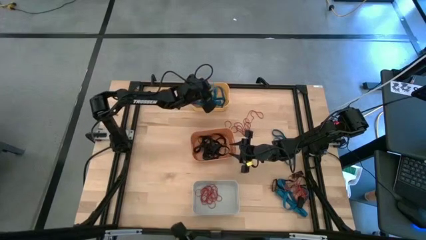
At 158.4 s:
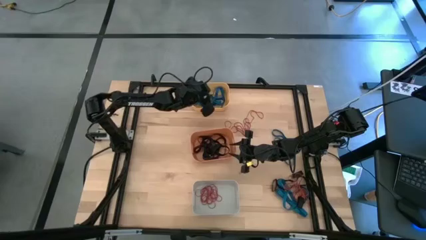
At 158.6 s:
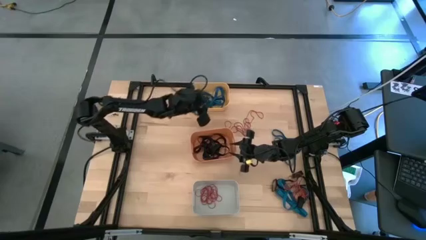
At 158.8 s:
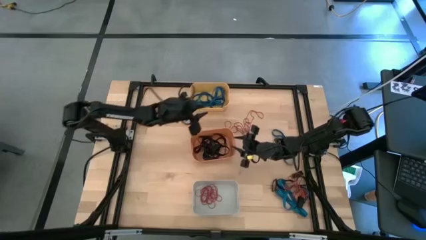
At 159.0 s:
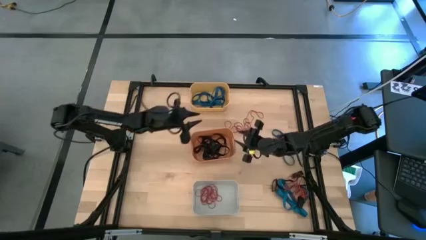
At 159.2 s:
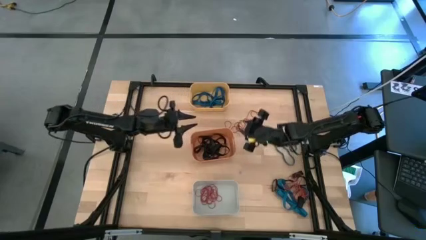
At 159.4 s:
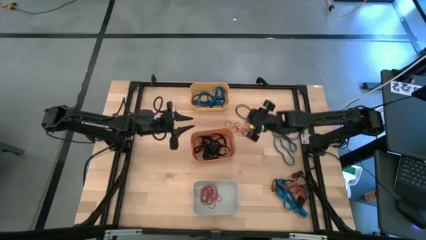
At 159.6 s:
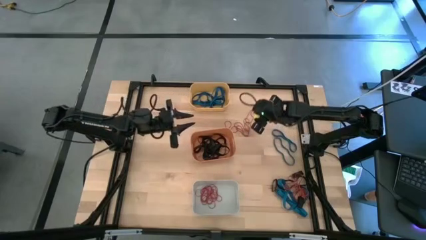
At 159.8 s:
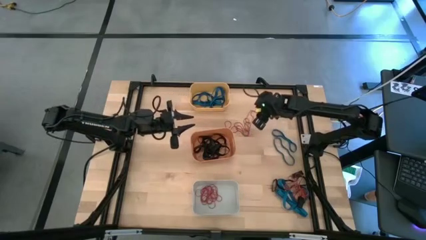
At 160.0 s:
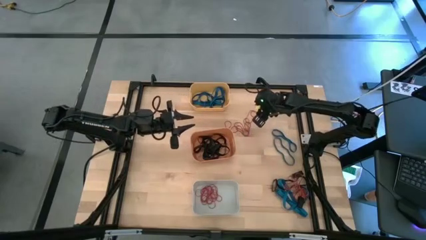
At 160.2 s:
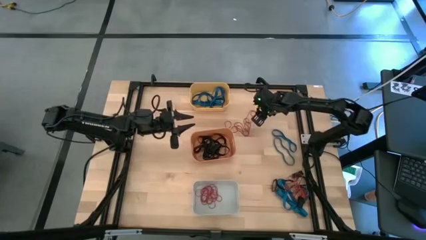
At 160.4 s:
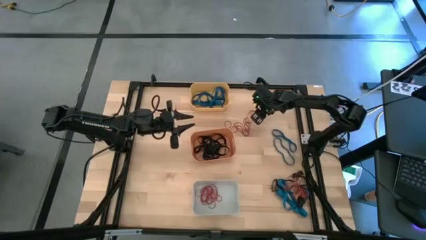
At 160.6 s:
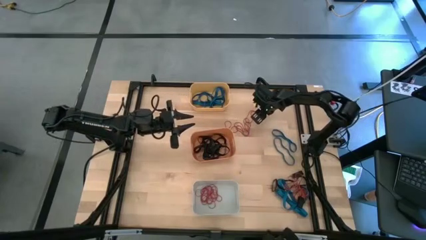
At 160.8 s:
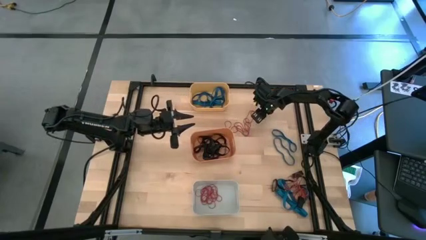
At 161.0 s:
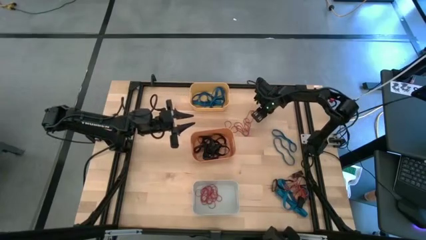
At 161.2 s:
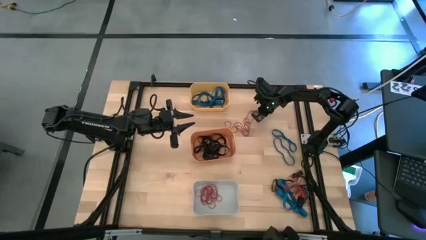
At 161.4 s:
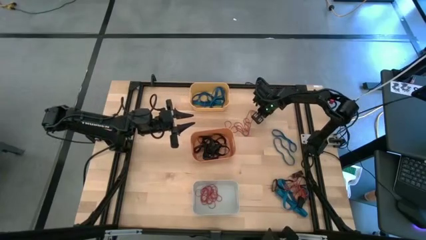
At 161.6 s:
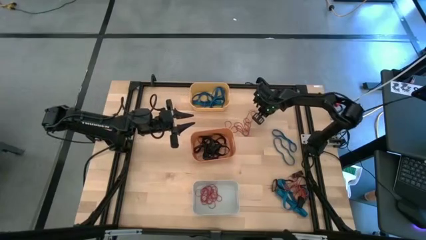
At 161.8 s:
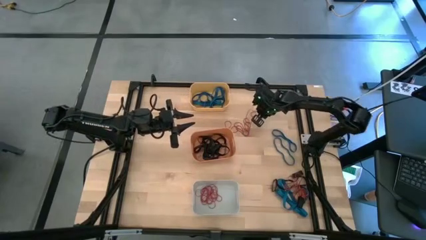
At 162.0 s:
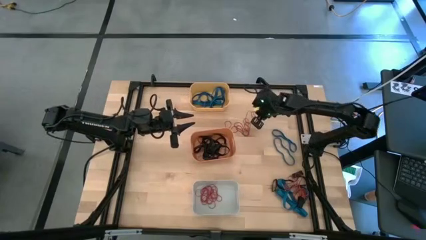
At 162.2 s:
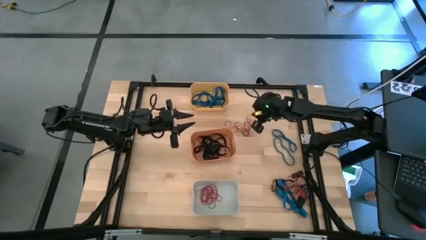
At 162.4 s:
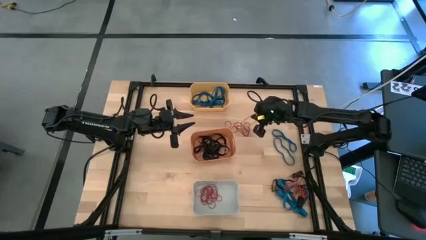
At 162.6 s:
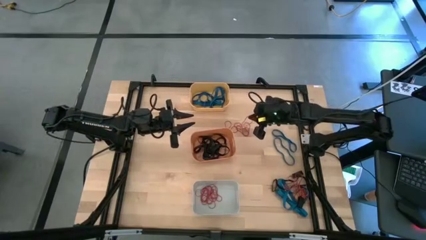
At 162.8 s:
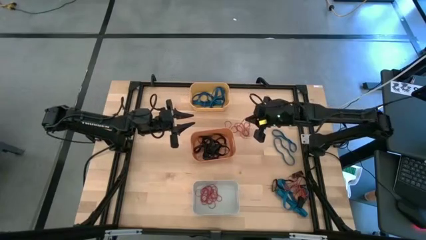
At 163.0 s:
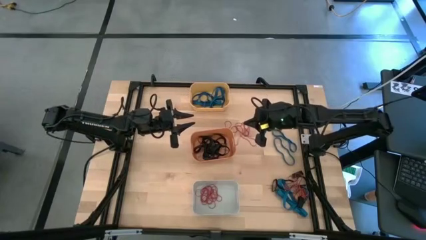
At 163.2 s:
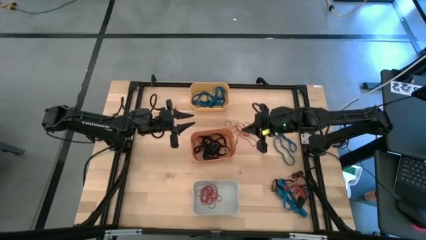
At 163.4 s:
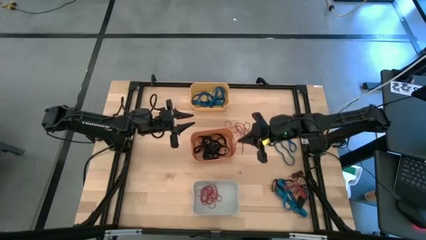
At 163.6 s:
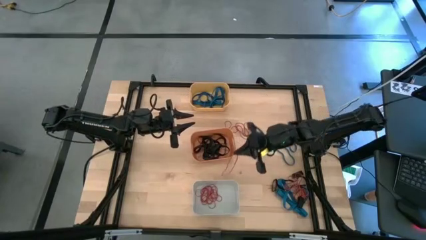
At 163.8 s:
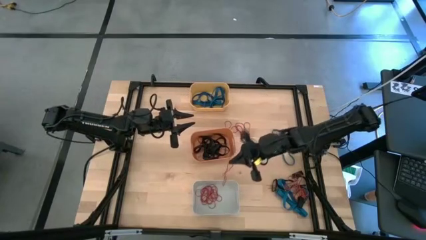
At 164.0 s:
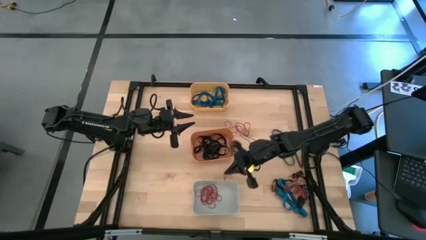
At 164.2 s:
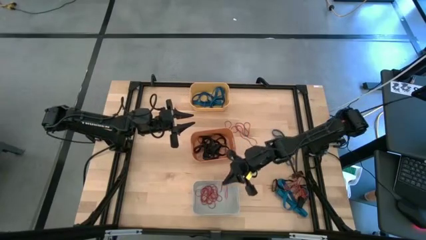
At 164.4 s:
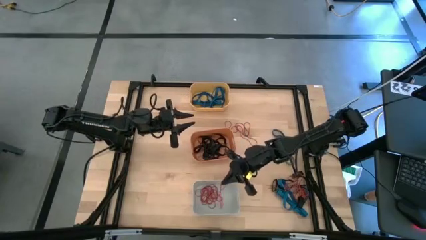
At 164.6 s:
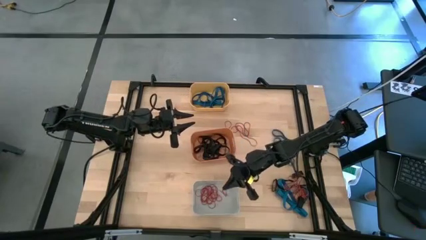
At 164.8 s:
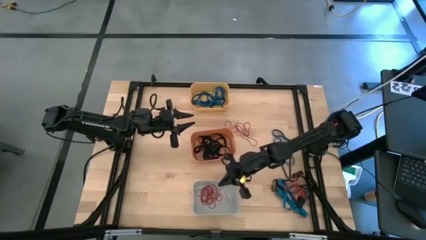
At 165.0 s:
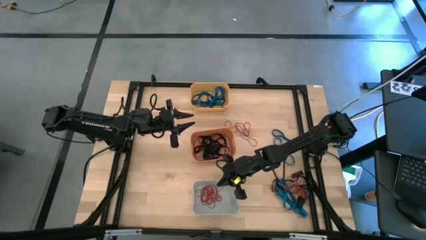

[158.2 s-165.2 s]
Task: Sort rubber bands into baskets
Put the red rubber band in the white bin

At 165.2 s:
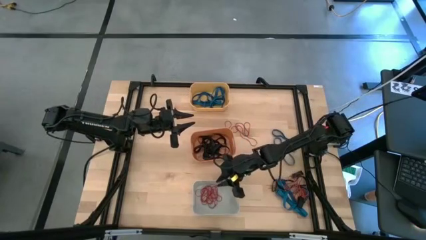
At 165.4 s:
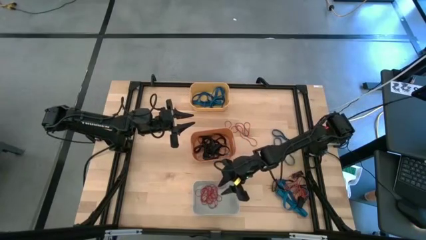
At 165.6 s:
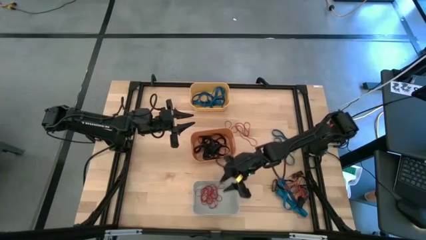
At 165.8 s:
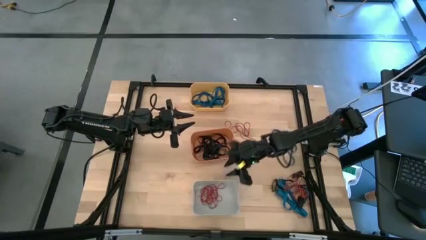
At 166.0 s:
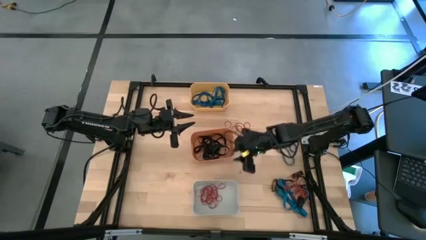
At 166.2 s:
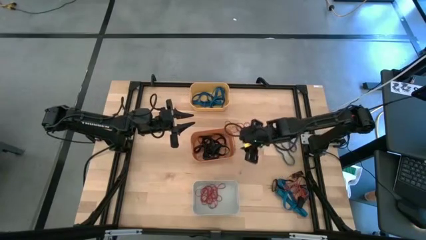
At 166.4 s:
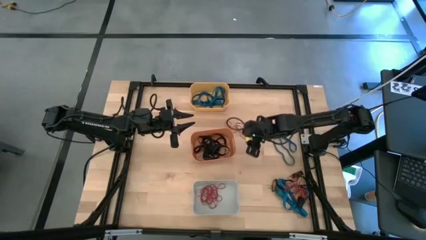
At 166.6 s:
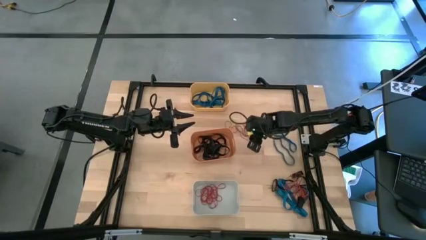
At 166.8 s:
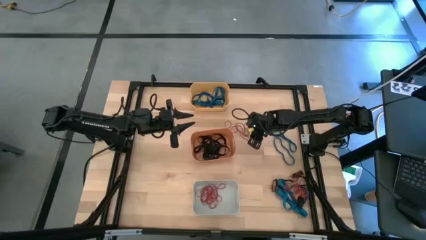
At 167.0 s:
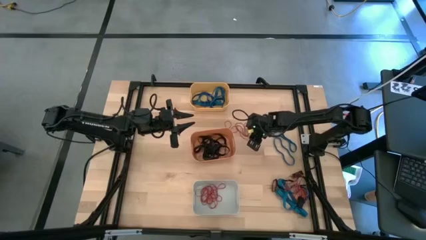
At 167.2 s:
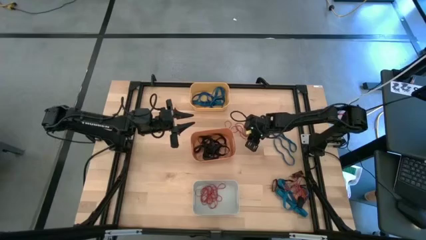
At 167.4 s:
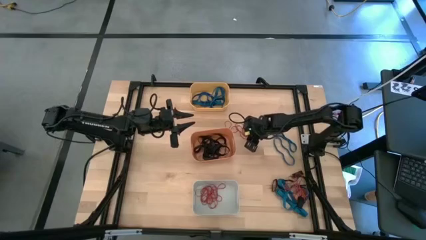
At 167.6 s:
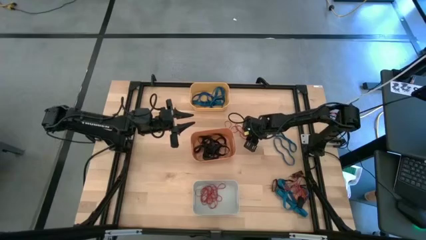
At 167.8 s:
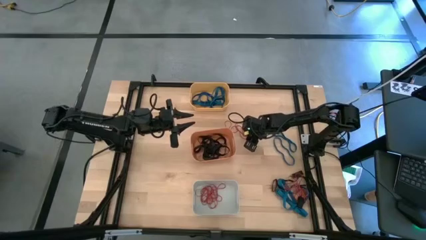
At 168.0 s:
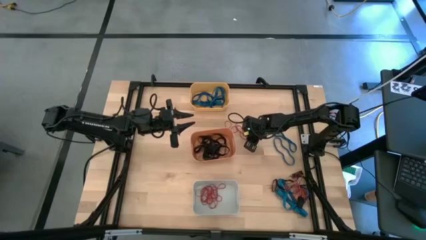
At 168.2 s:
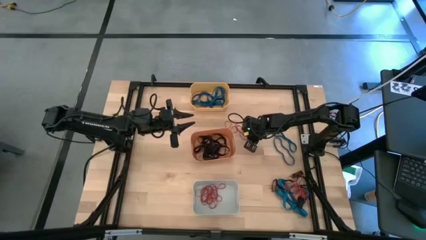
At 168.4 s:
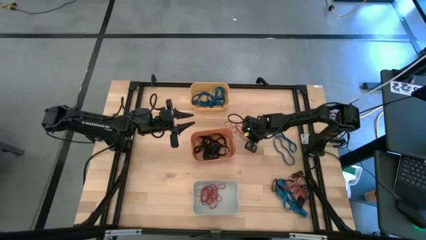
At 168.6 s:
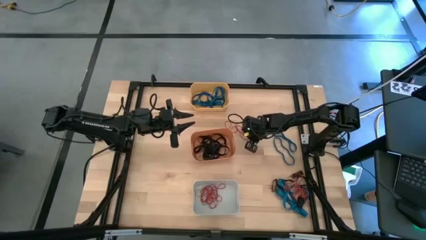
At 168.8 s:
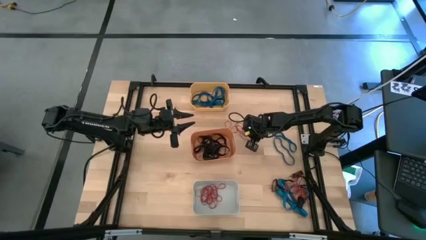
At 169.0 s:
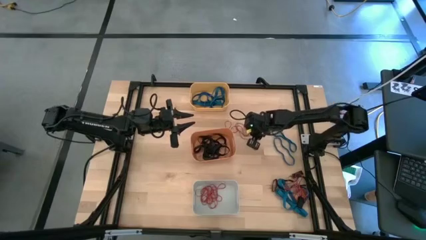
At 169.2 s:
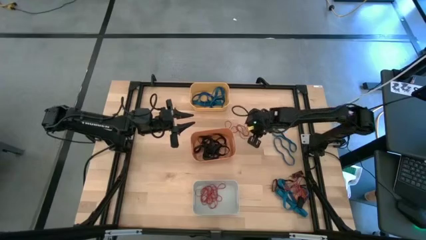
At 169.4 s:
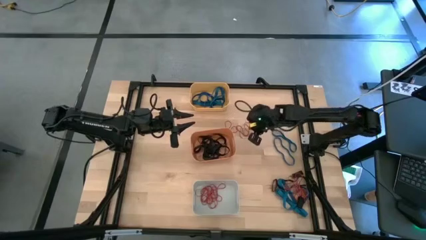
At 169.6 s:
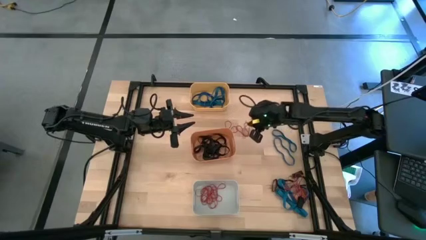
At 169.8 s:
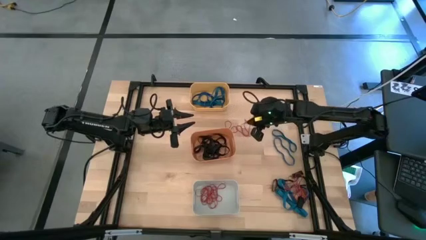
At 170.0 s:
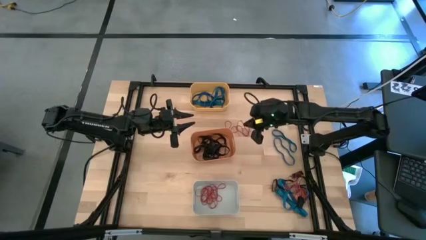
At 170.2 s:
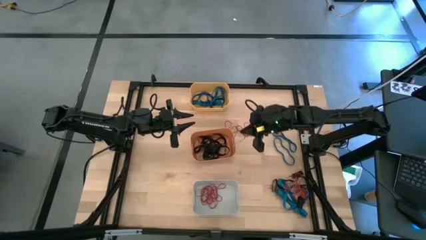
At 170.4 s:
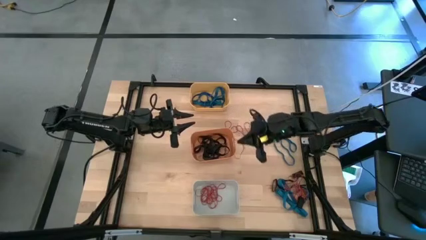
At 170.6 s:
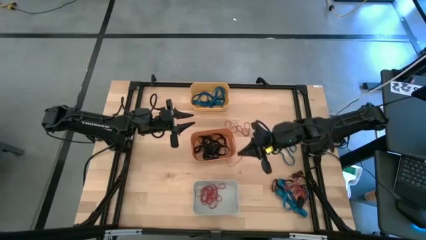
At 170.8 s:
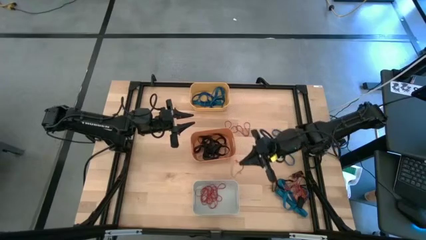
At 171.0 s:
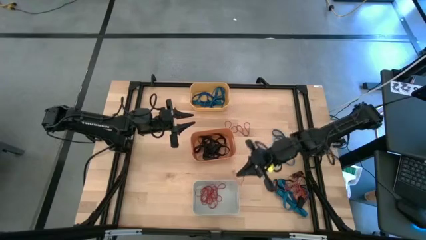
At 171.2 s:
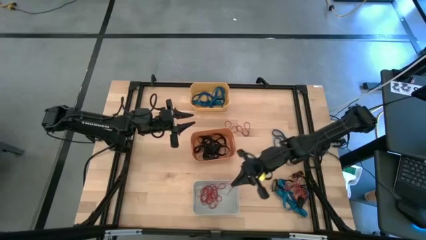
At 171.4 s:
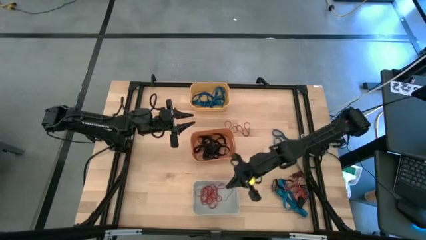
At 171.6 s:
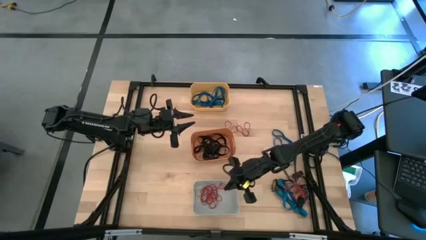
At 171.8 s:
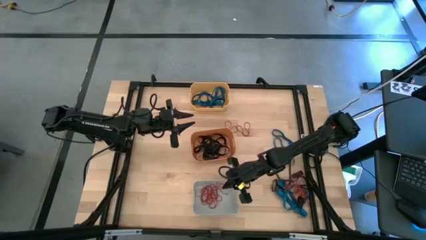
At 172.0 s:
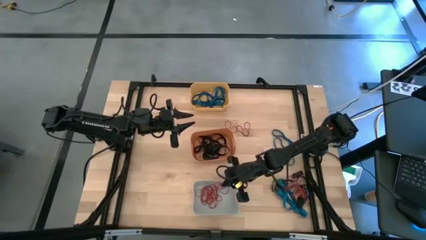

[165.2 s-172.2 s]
Put the red rubber band in the white bin

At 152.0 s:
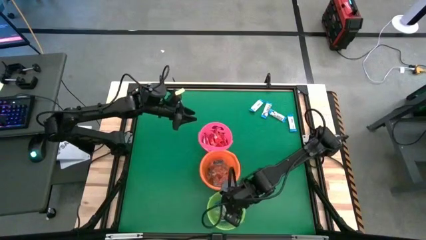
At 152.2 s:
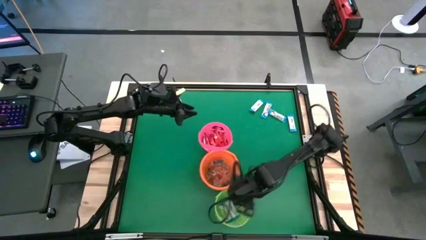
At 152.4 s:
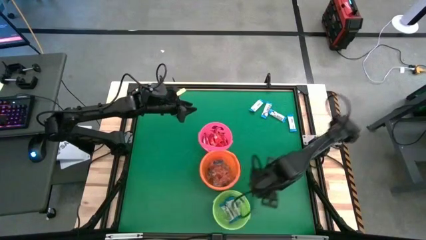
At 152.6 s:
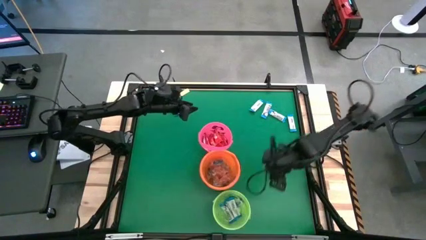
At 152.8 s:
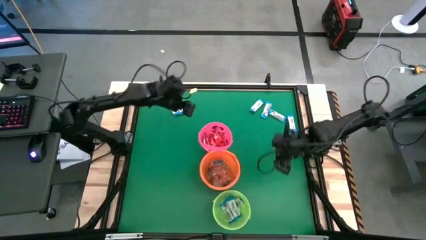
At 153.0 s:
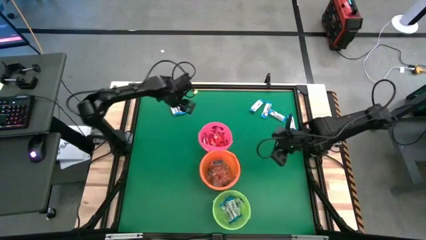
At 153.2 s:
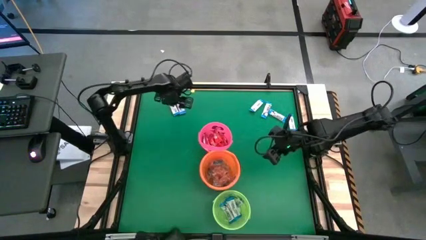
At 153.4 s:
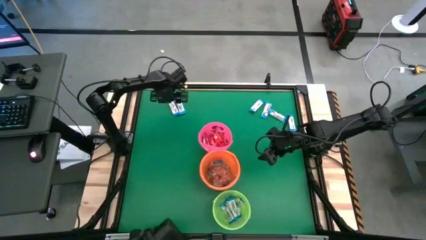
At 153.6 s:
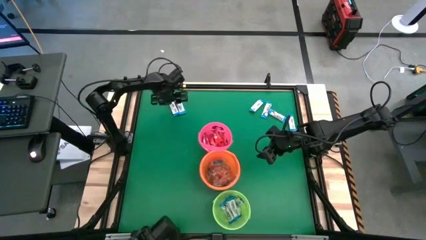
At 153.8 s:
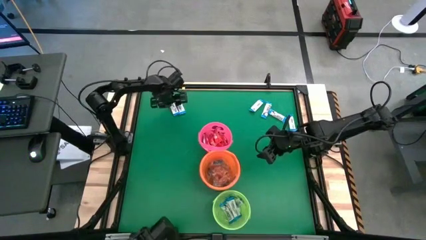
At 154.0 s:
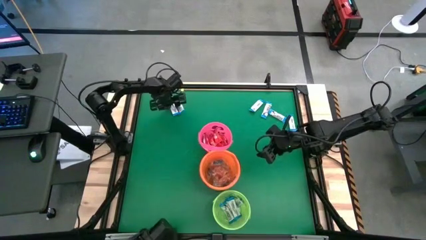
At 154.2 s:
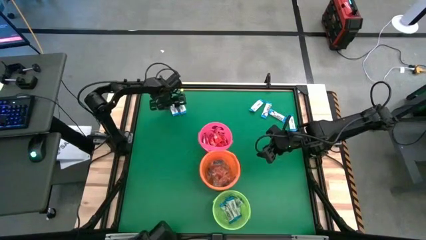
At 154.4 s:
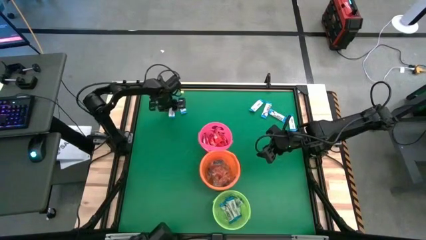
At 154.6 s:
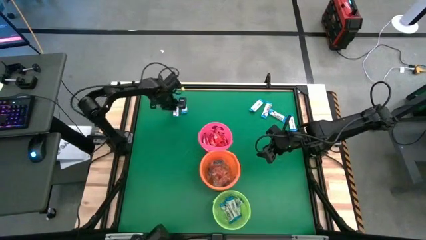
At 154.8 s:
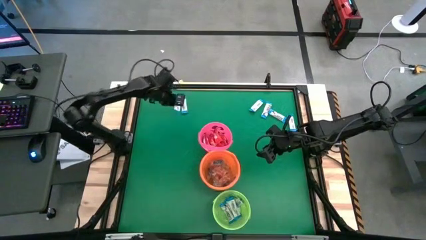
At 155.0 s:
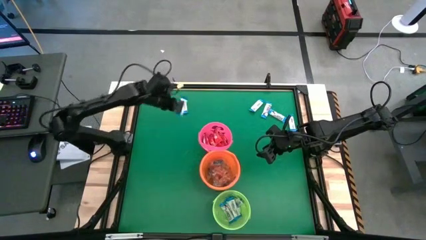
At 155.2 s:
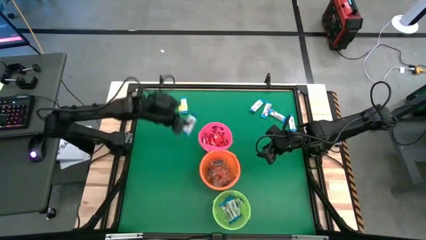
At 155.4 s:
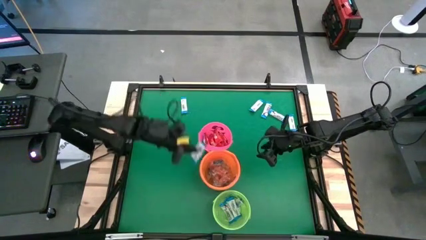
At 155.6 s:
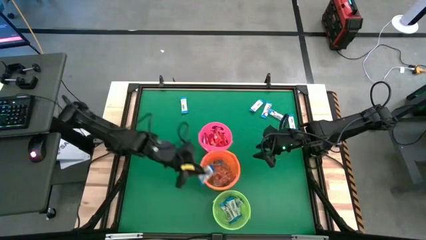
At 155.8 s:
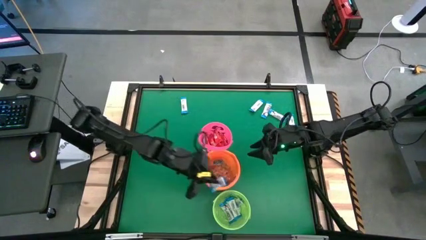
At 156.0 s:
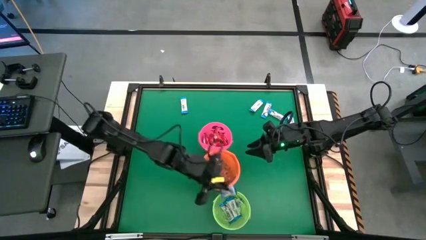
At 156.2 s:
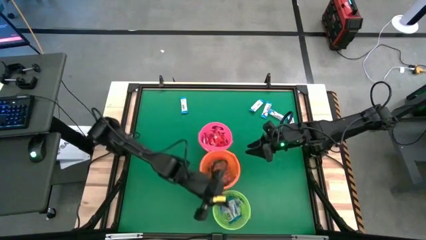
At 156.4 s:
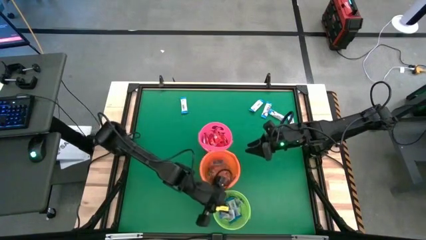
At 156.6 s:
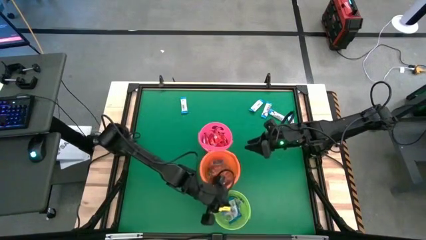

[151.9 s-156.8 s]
Task: Sort candy by brand, put in halloween buckets
Put the white chocolate into the green bucket
